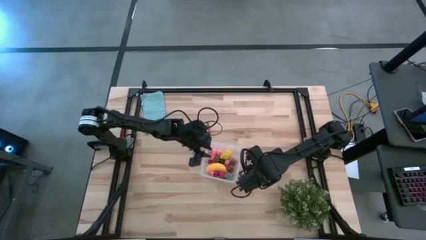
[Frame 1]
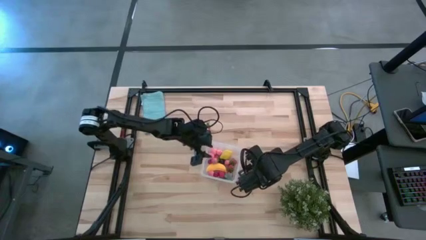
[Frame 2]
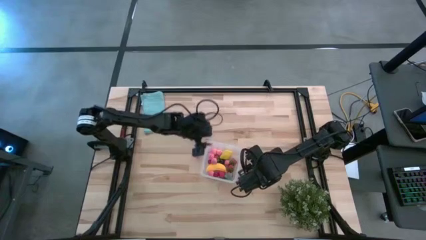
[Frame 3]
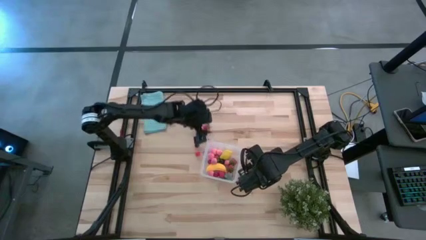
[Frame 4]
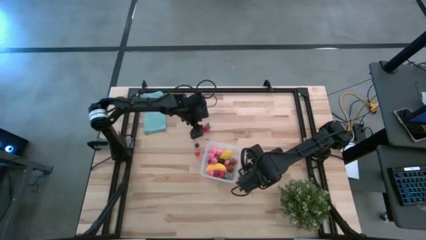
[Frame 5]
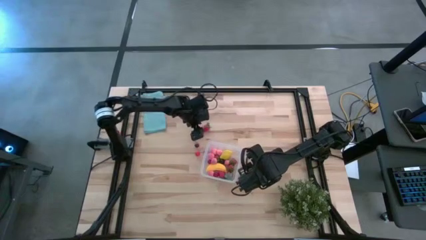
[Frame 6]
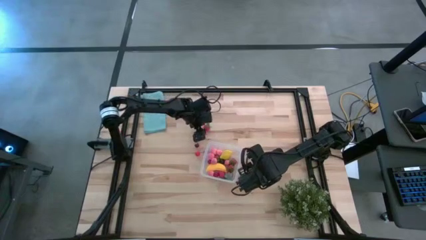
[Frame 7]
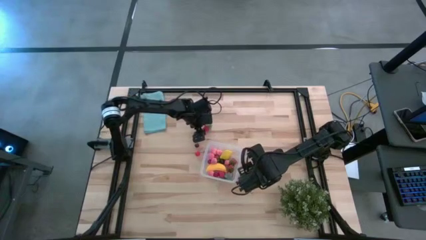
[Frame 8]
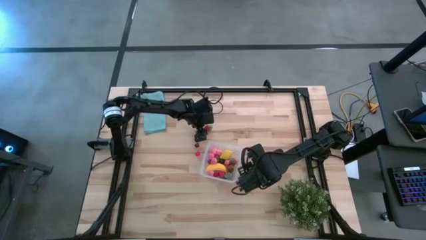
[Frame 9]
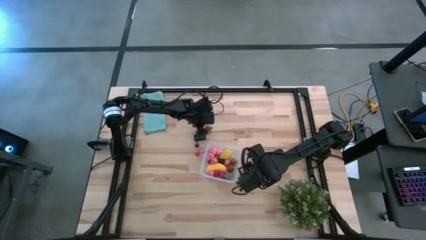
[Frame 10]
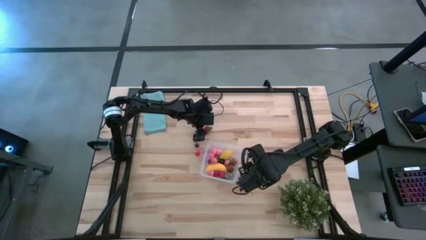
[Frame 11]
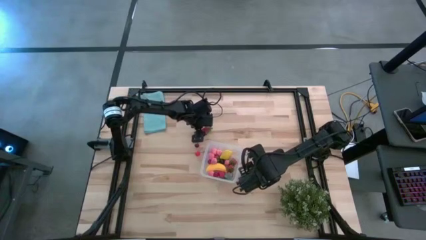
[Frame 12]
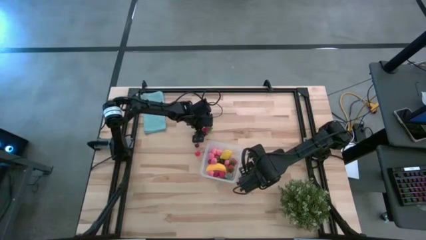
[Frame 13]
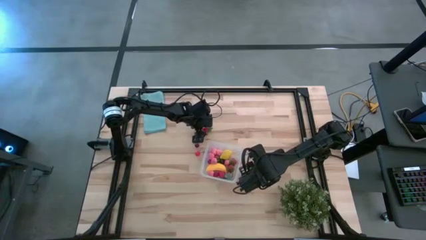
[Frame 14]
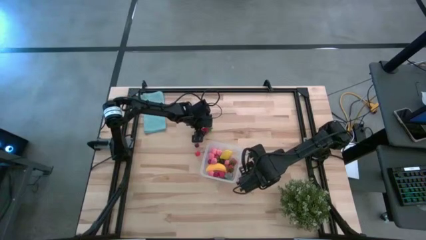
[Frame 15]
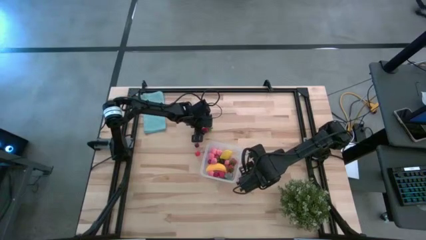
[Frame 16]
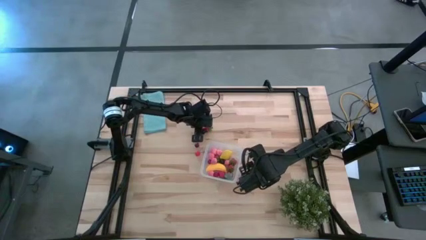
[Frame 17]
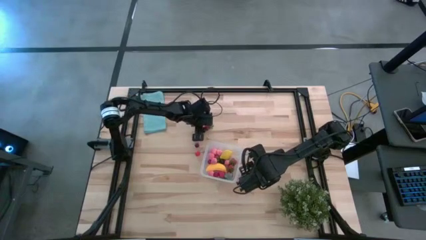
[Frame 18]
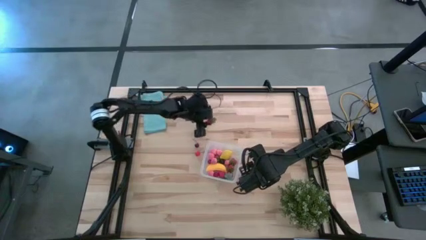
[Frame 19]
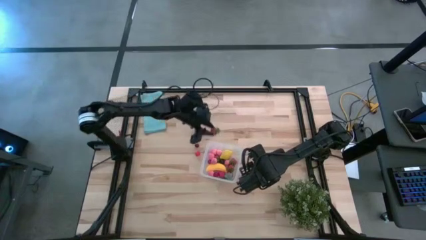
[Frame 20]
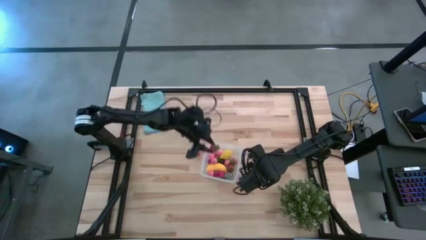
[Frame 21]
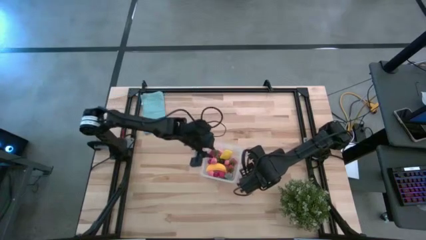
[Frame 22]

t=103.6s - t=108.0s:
Task: Pick and placing Produce into tupperware
Put the red strawberry into the transparent container

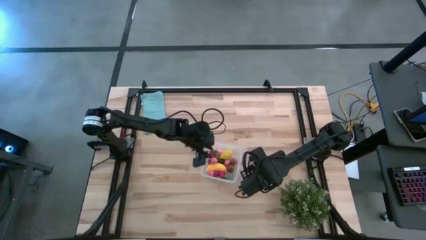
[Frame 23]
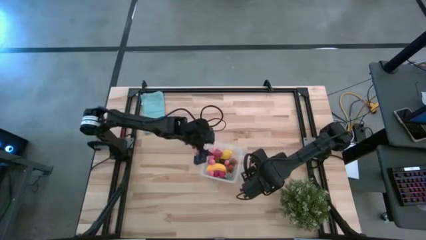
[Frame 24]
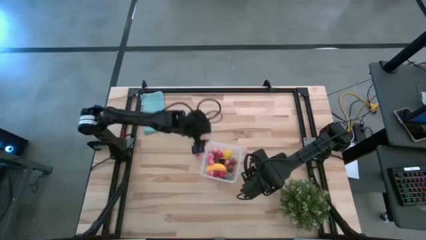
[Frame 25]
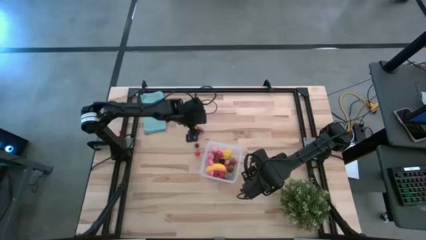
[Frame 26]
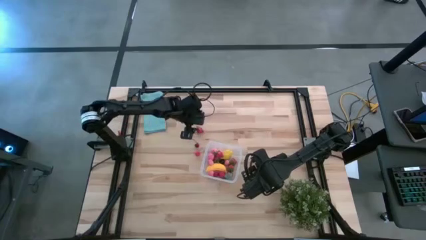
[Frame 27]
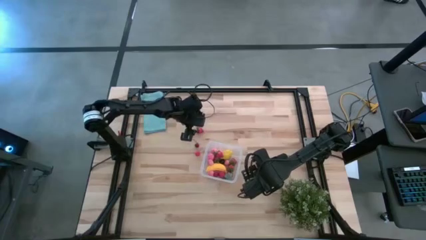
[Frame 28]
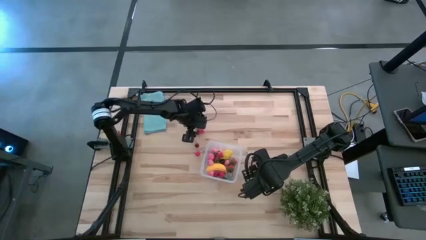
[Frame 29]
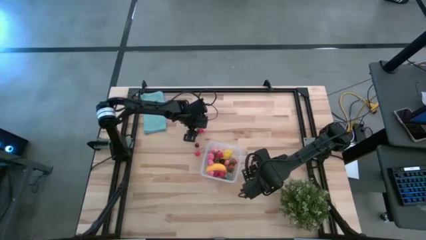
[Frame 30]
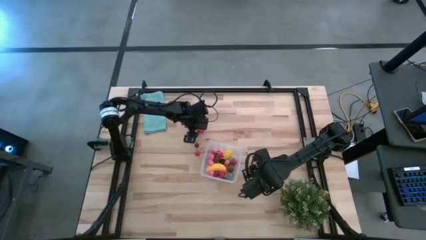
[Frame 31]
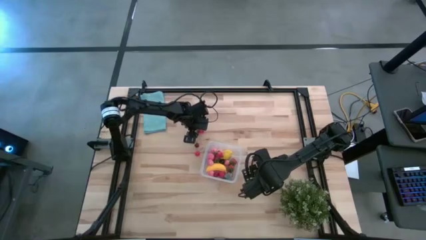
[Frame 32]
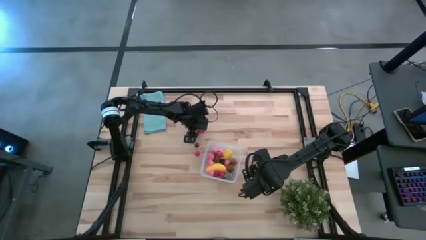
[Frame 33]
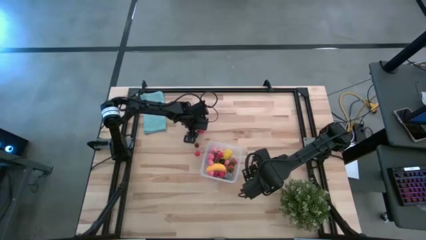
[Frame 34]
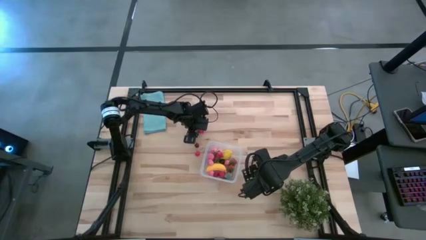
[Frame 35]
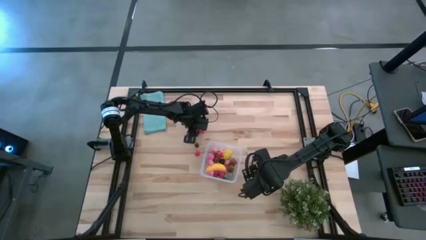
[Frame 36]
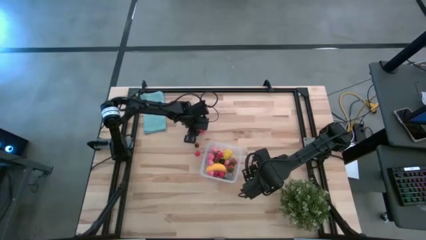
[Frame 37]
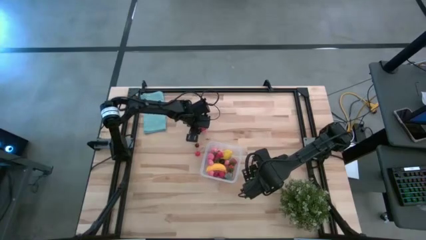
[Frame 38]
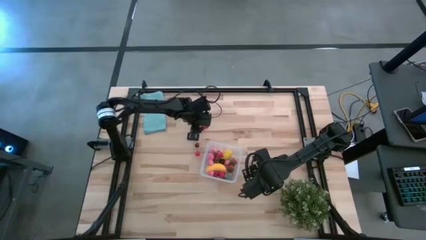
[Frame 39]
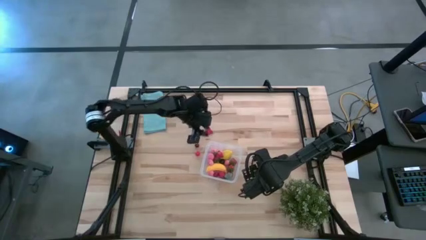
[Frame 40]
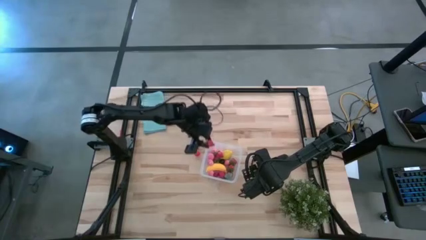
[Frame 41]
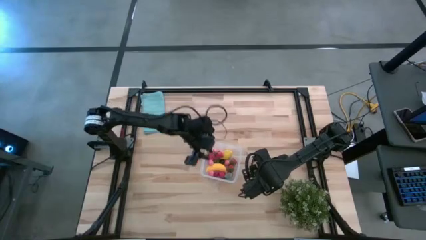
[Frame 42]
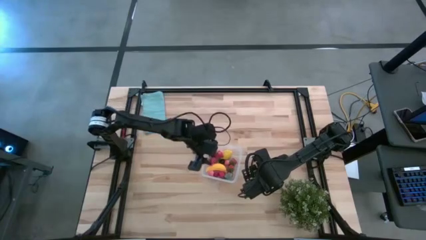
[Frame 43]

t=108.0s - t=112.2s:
Put the red strawberry into the transparent container

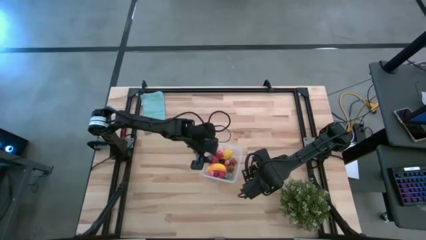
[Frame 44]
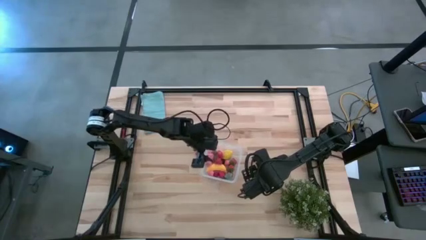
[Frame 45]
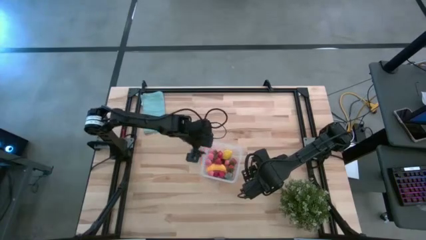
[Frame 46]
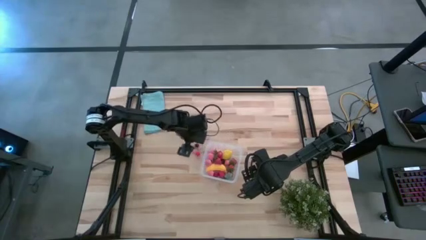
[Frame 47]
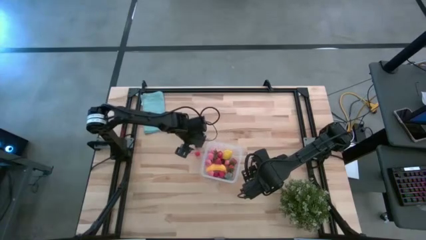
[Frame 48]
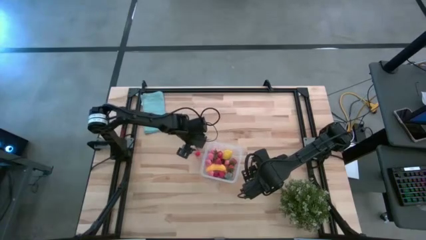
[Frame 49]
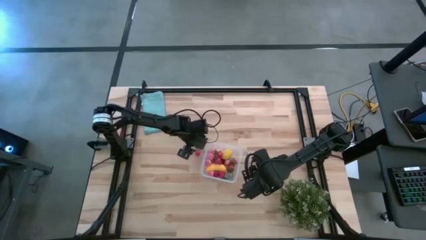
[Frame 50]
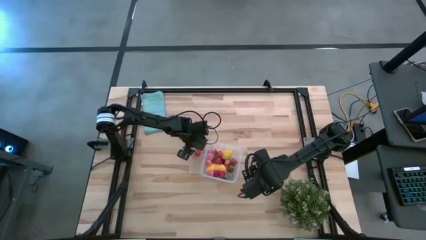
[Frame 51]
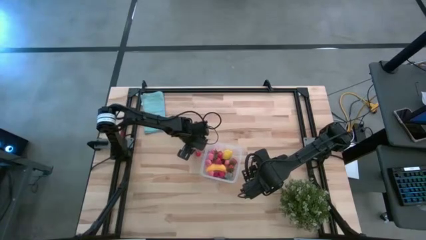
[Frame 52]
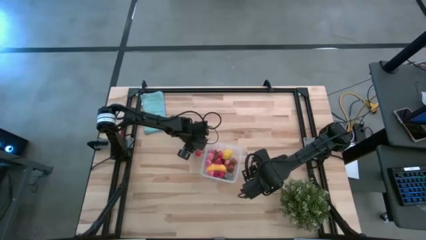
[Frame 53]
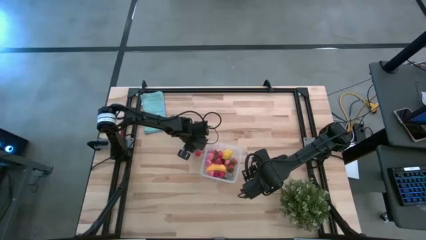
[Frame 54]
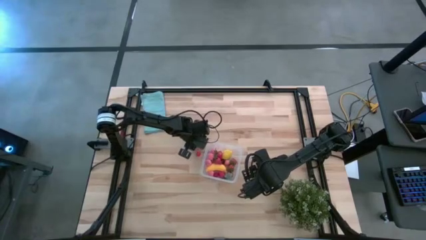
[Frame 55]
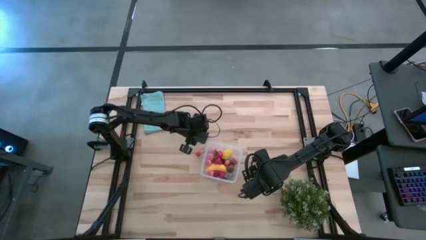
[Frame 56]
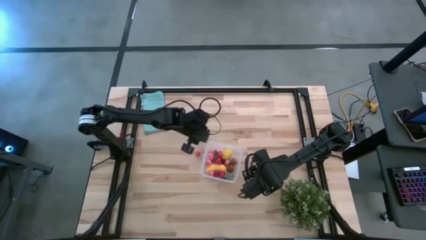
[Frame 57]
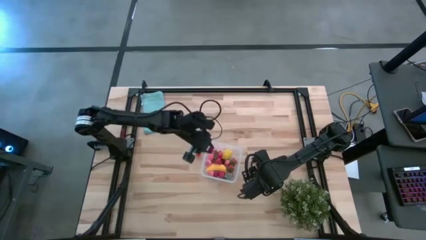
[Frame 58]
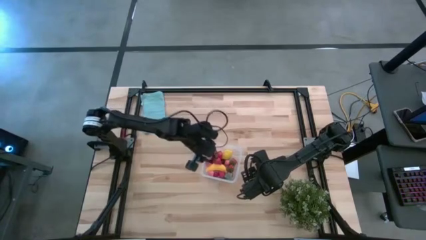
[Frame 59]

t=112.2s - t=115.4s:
Put the black and red cherry into the transparent container

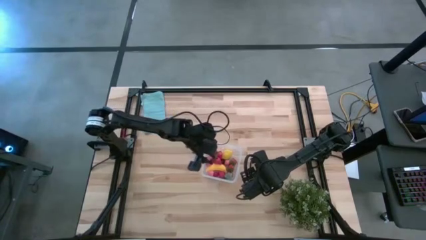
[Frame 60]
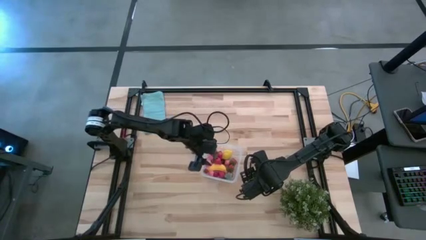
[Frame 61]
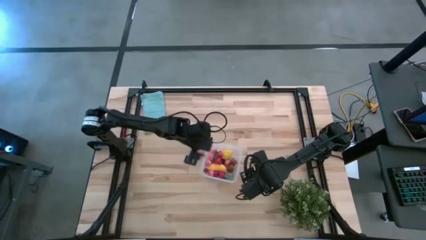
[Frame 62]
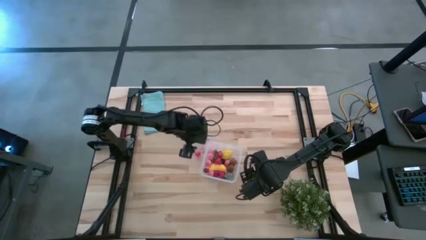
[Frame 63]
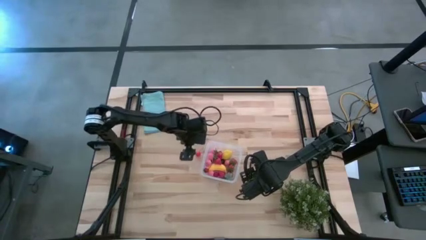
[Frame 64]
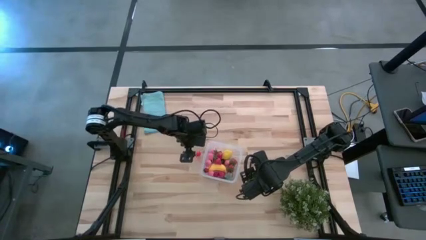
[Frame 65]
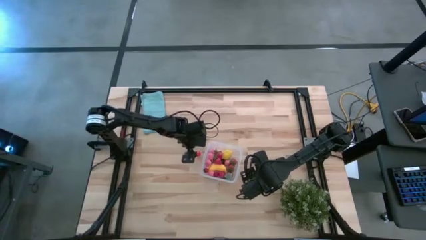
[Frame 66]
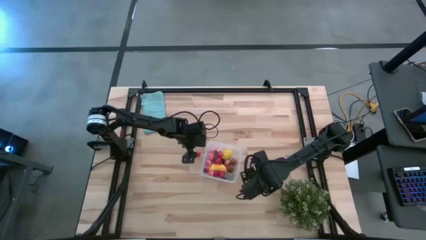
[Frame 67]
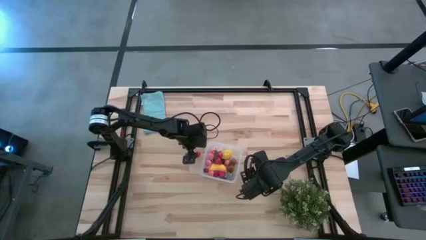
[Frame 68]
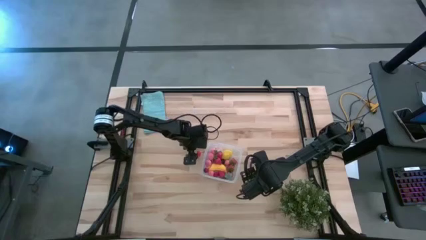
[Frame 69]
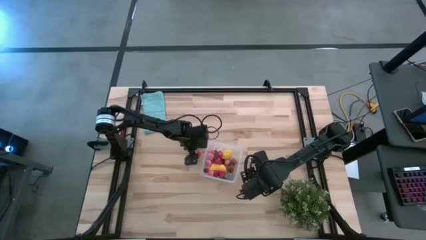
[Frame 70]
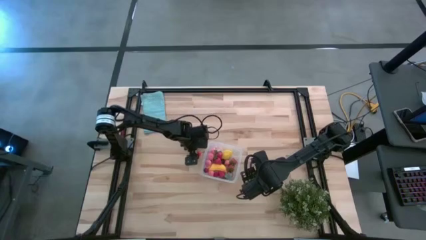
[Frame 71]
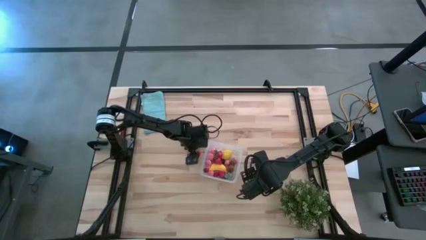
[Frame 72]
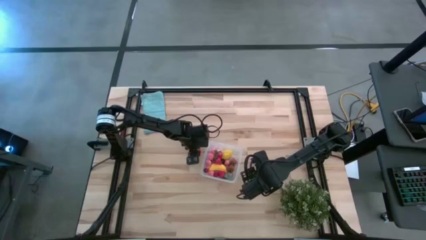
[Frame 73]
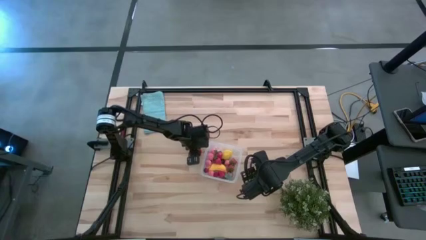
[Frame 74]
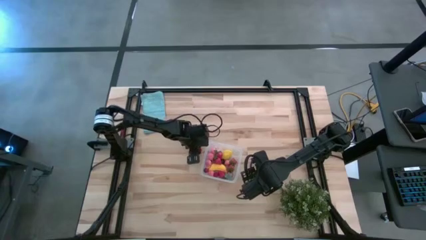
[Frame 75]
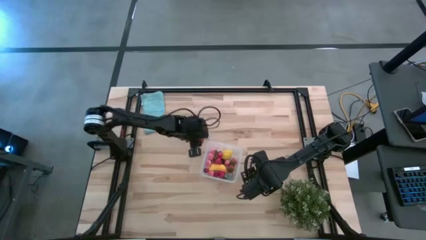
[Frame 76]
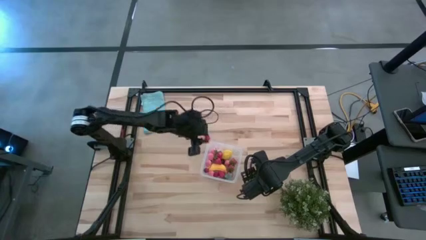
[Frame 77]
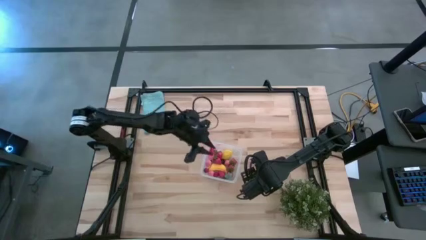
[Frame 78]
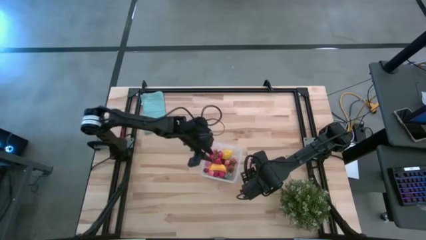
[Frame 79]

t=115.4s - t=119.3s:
Put the red cherry into the transparent container

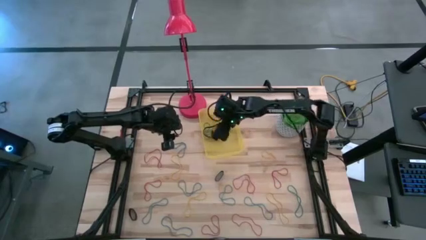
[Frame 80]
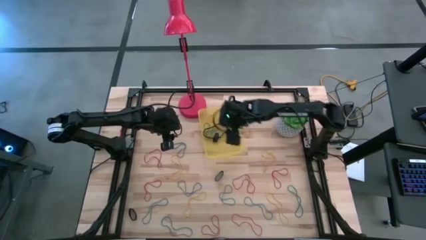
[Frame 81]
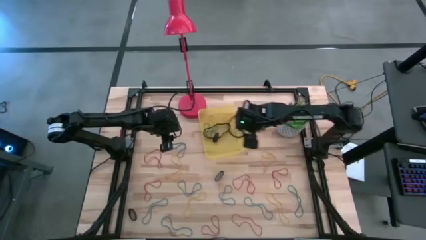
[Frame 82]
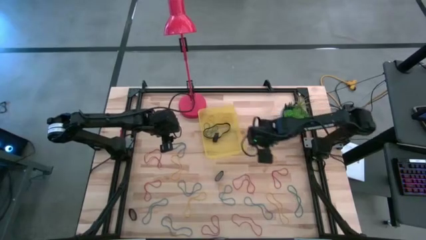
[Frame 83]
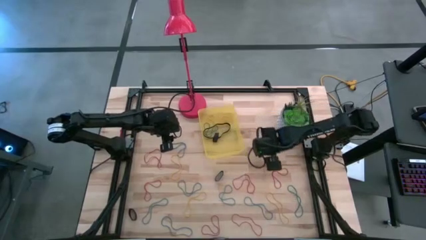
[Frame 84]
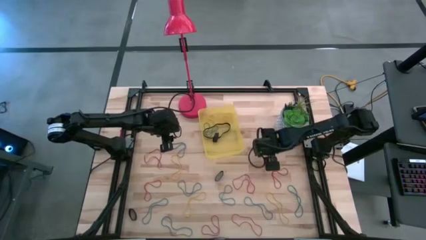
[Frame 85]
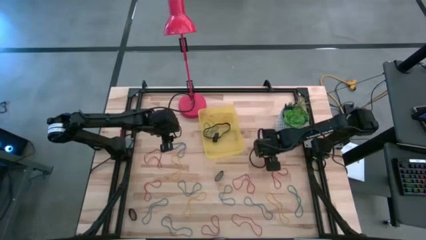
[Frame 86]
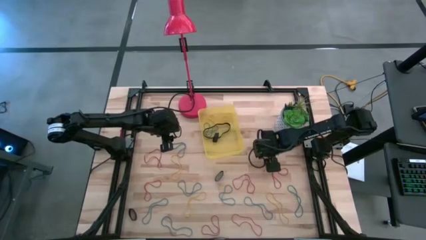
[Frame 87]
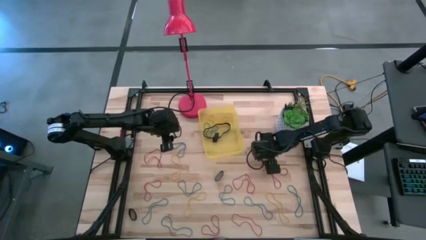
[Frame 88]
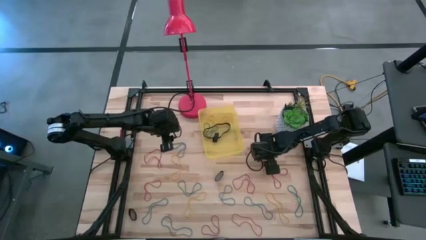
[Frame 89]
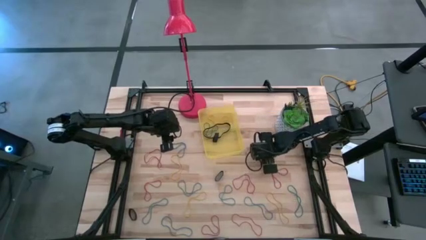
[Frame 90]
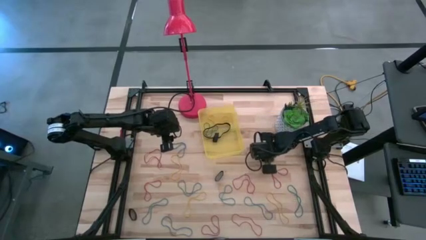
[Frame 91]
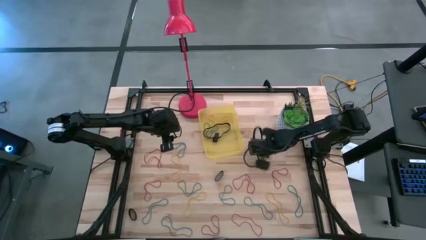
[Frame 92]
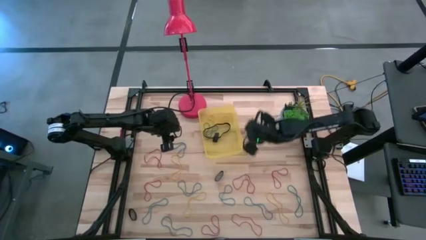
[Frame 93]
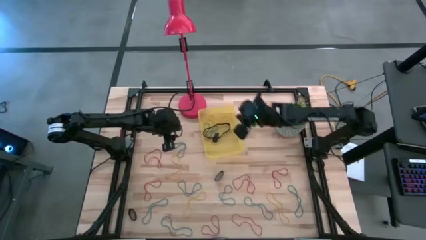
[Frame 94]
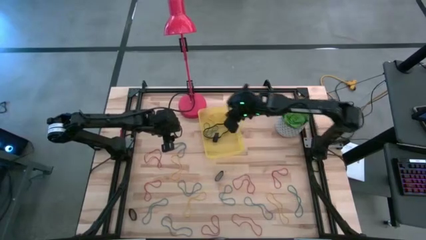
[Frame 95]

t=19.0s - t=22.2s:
Task: Pick and place rubber bands into bin
Put the yellow rubber band into the yellow bin
